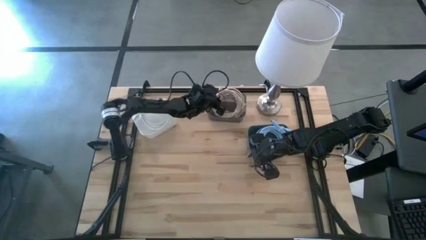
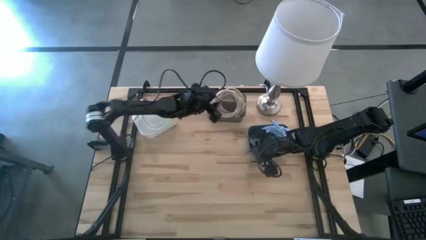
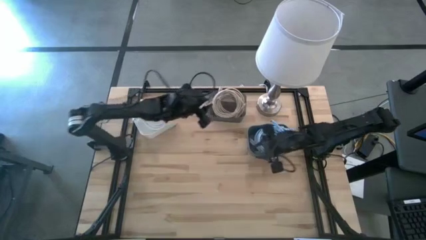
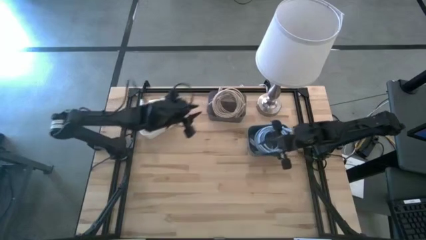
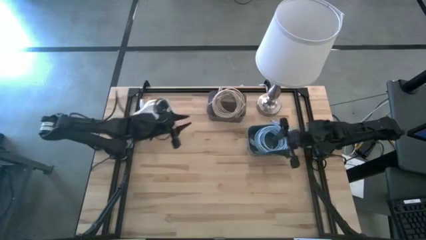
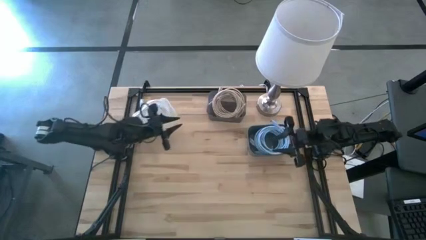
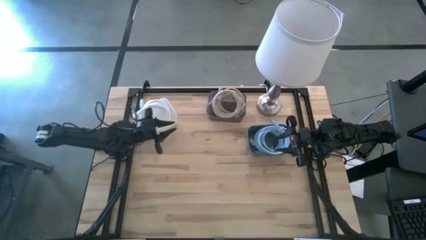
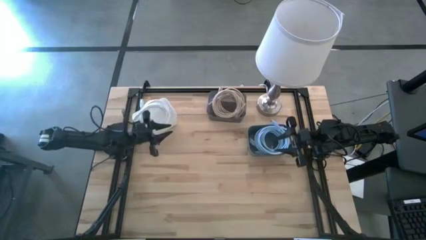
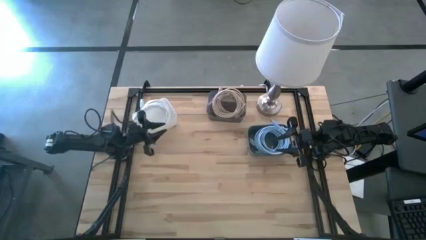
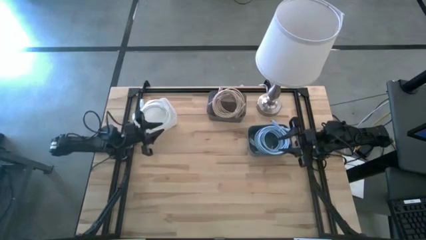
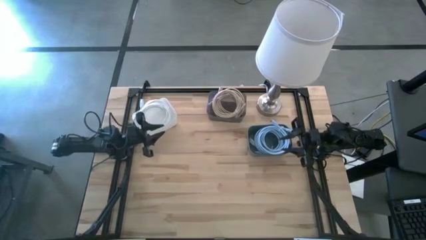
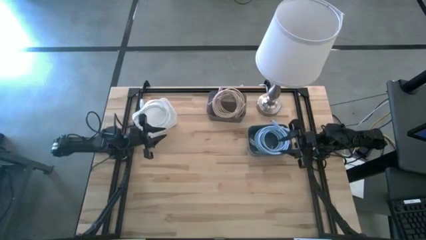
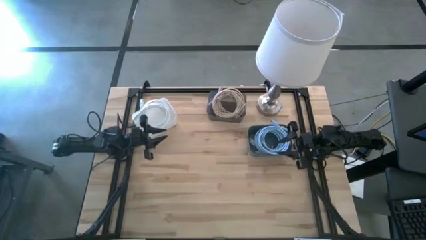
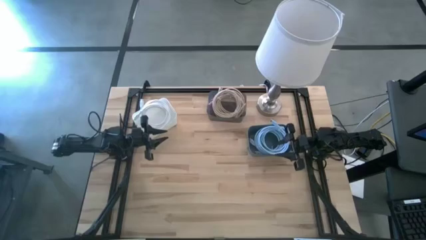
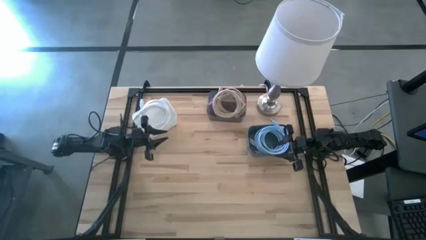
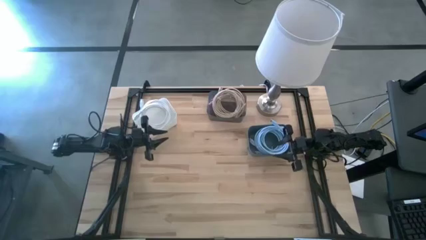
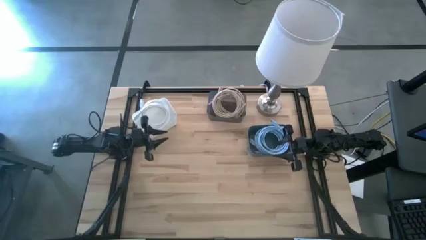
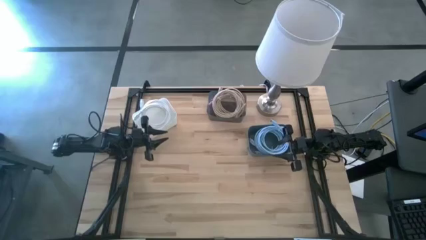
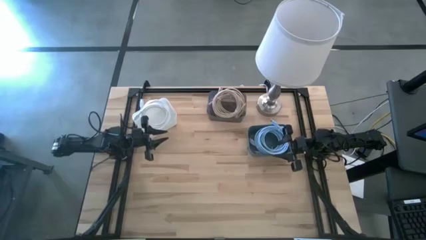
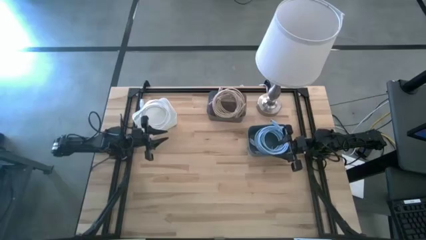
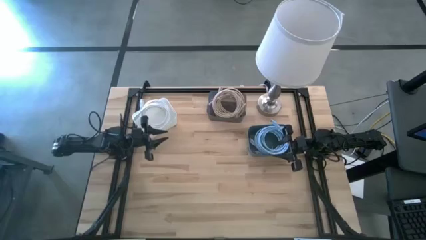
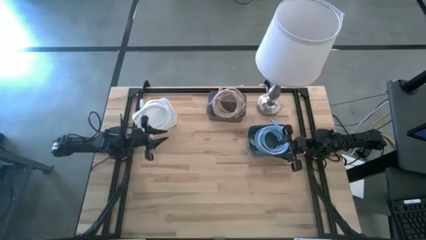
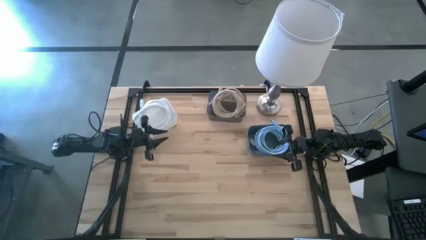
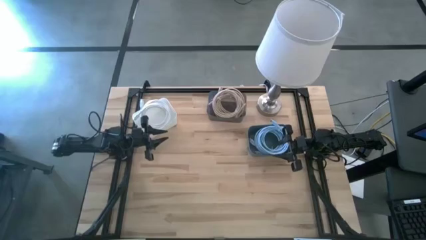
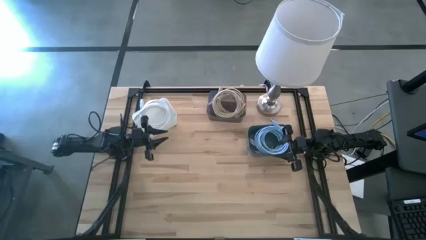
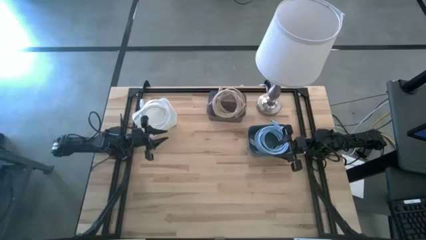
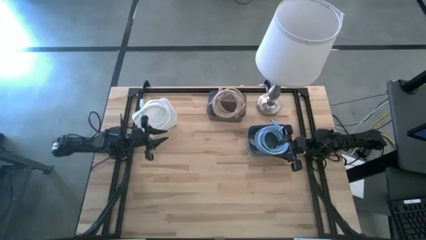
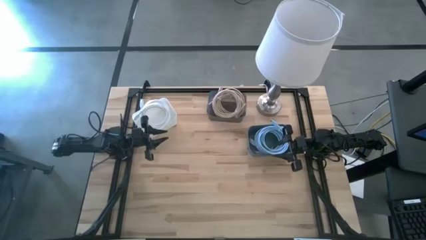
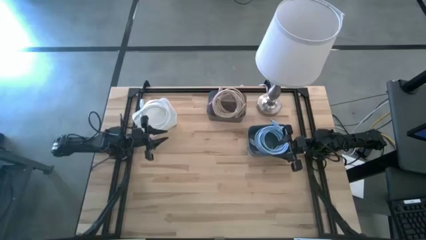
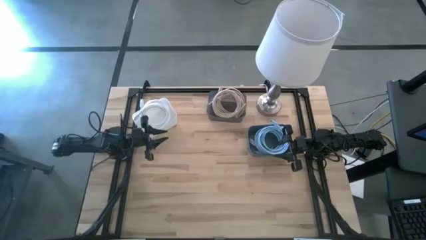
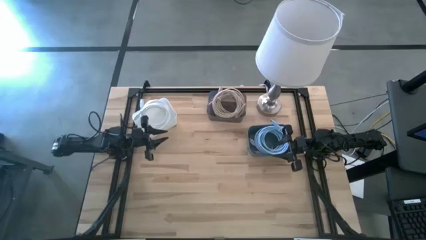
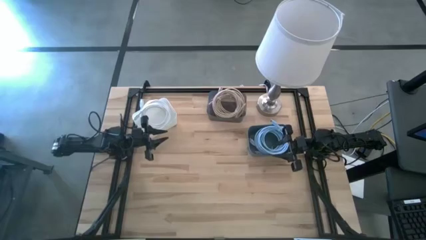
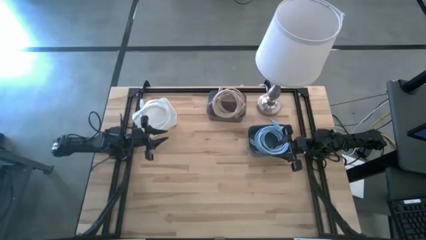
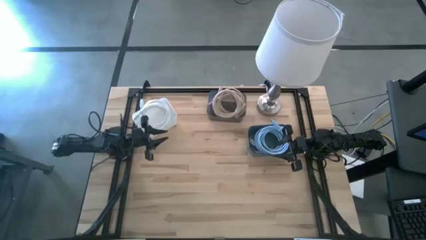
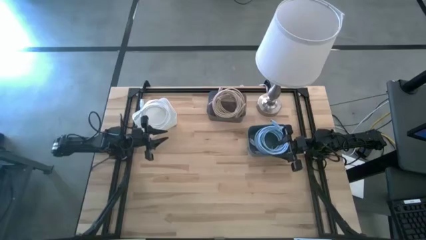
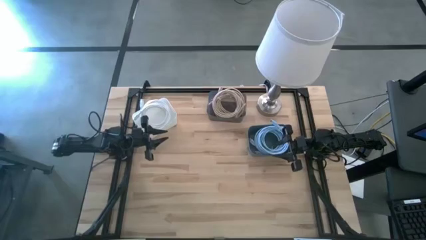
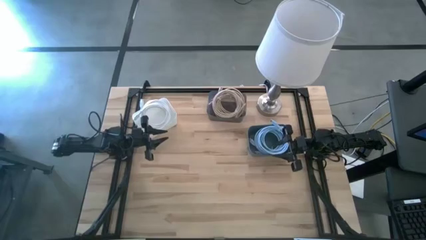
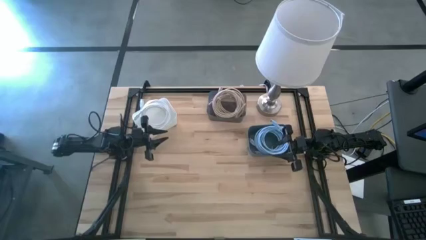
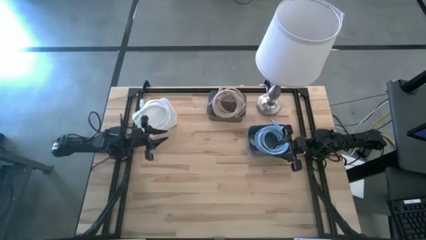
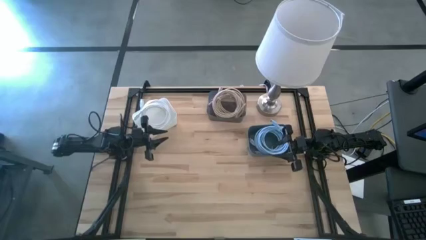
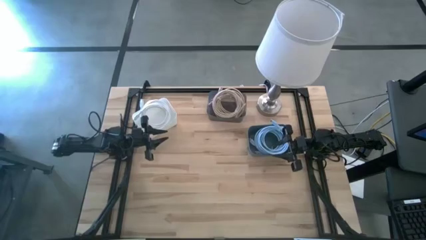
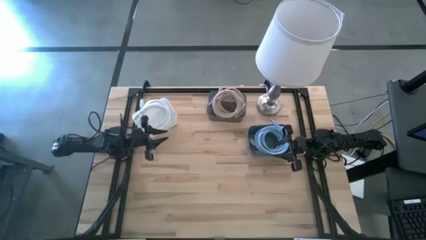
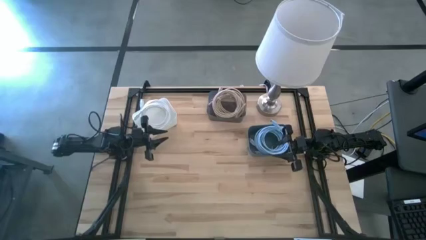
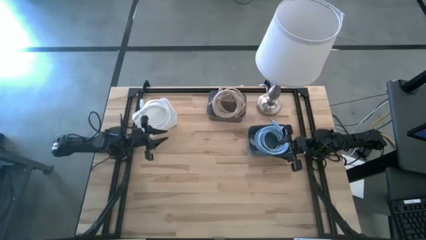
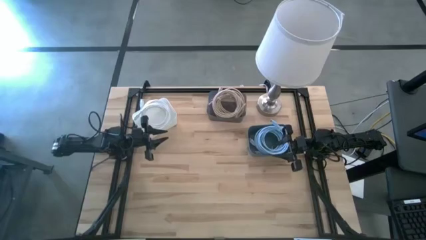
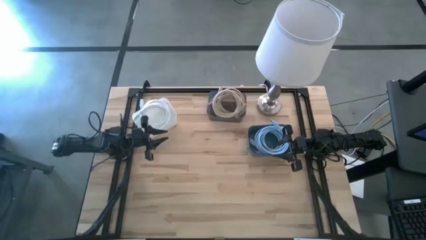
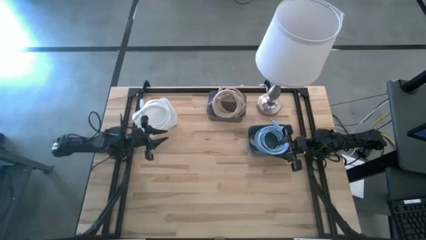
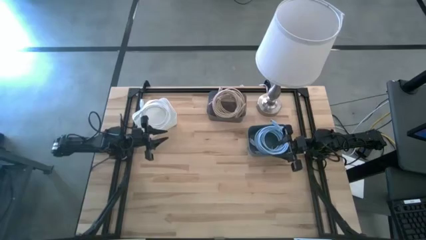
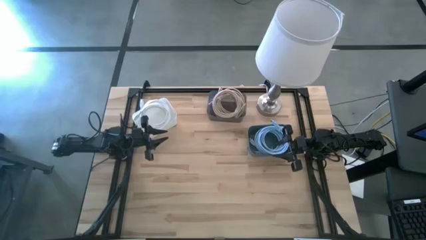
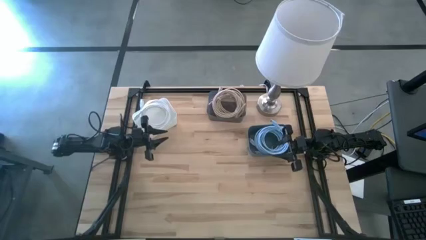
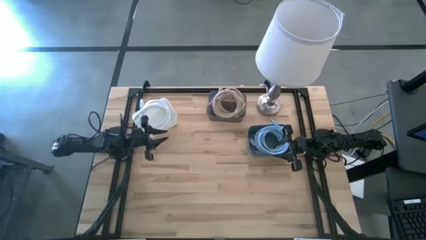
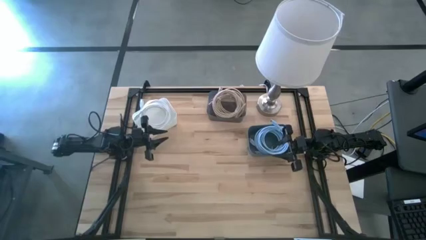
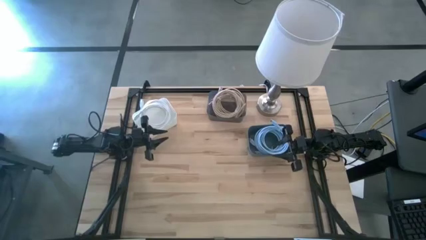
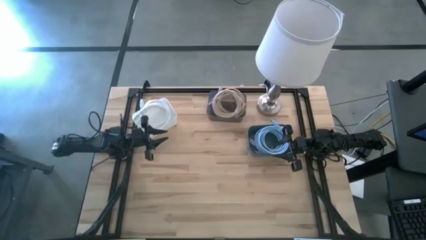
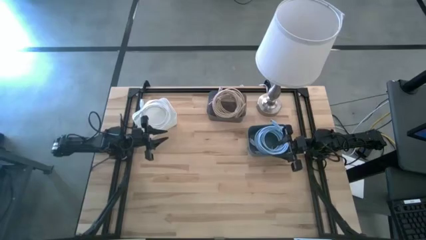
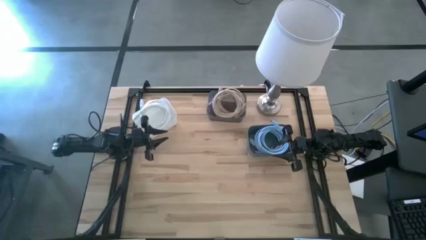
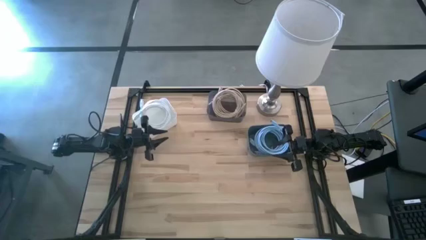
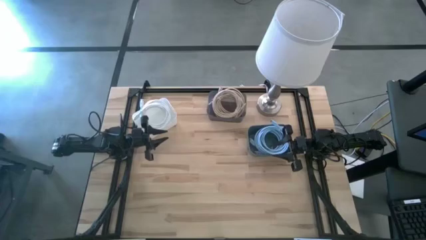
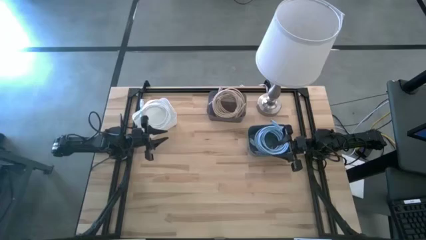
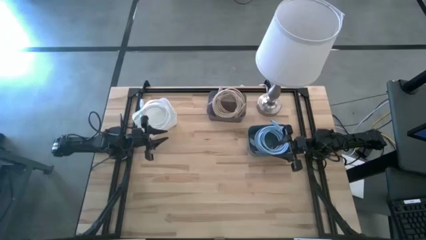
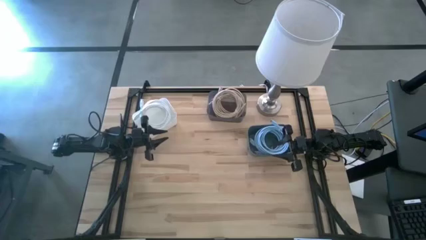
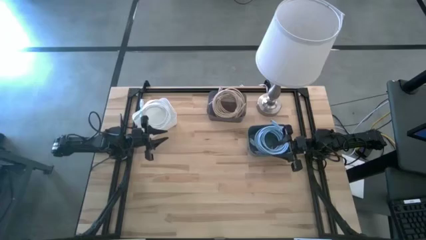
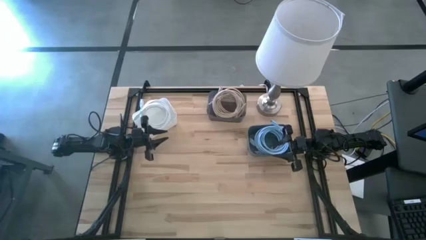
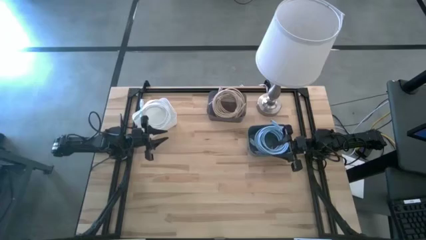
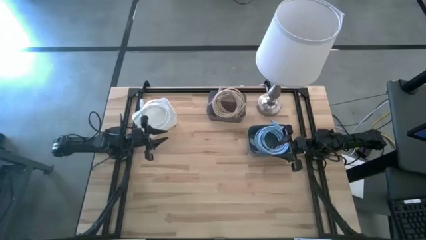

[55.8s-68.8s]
Task: Pick & Place USB Port
Return to Home Position

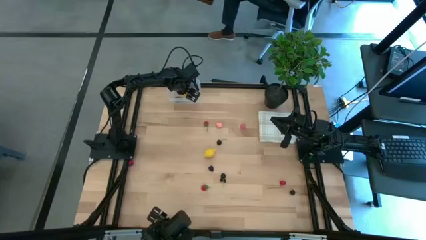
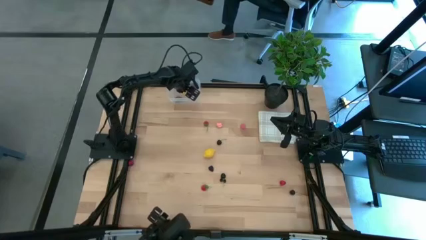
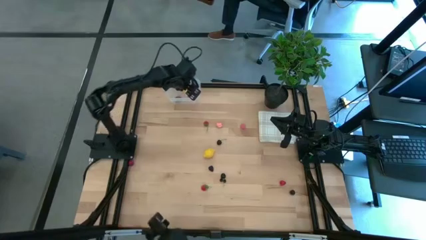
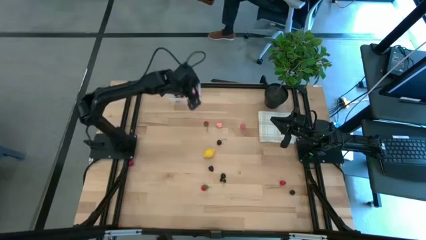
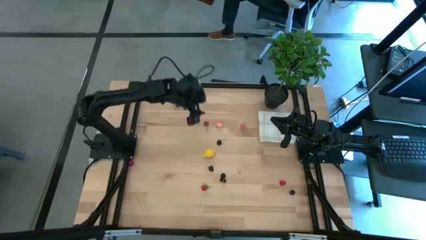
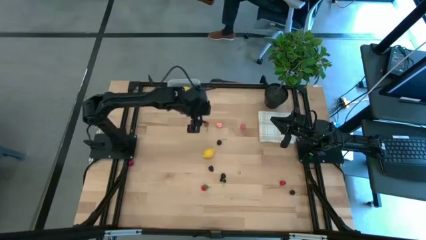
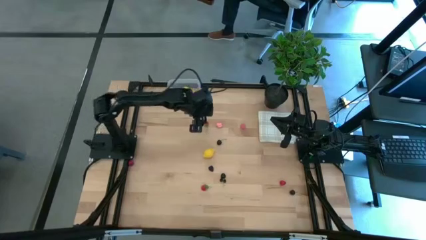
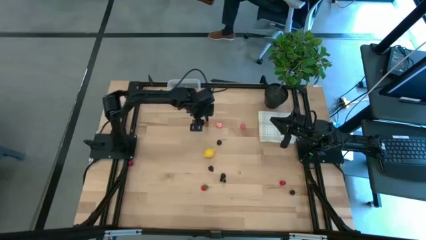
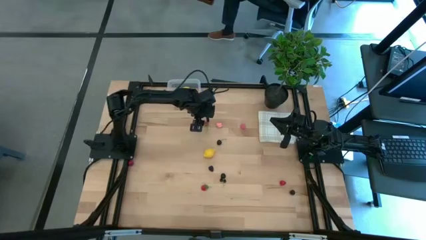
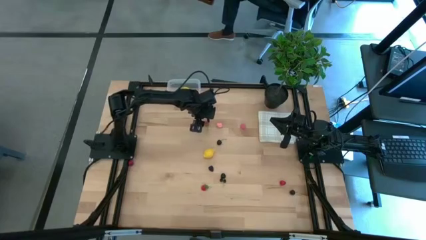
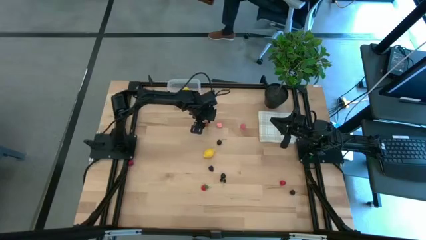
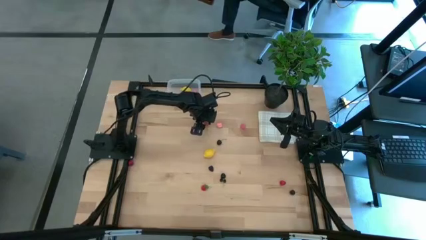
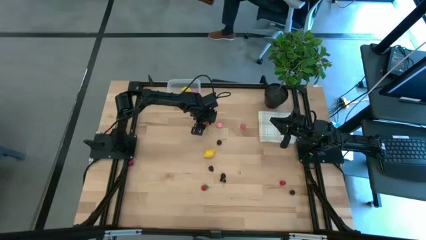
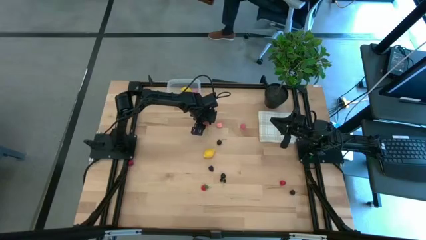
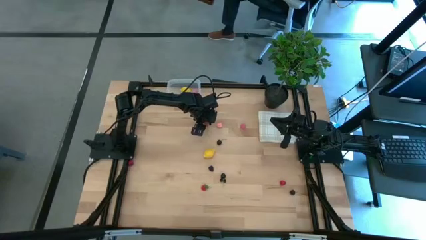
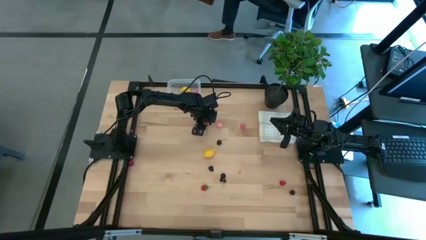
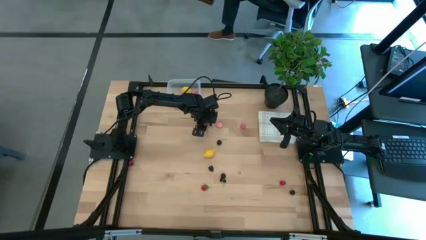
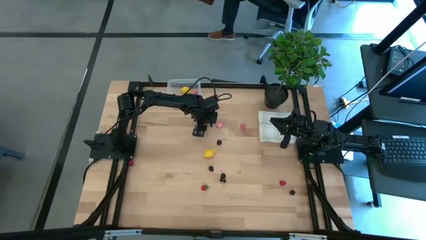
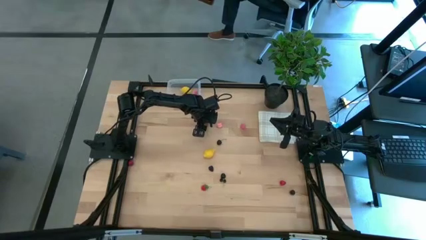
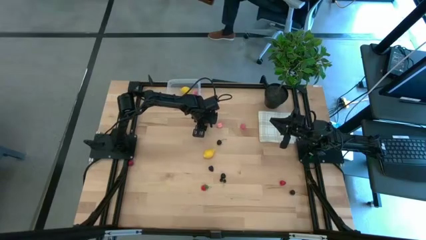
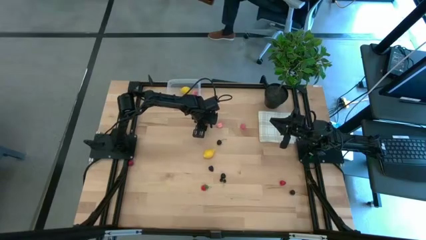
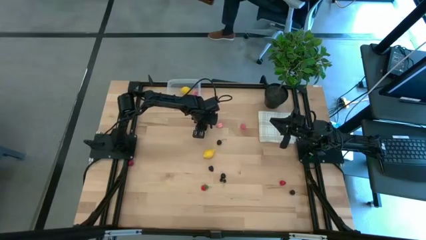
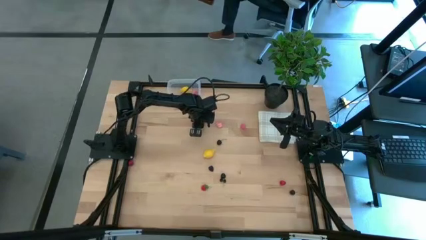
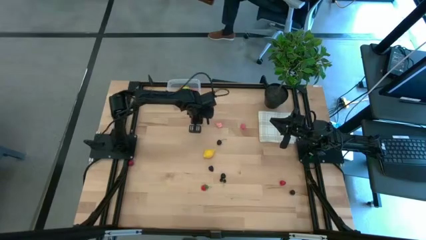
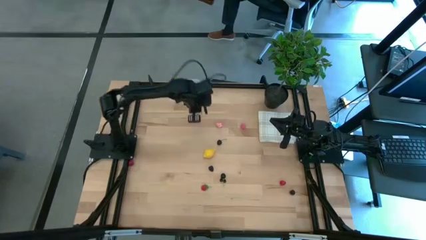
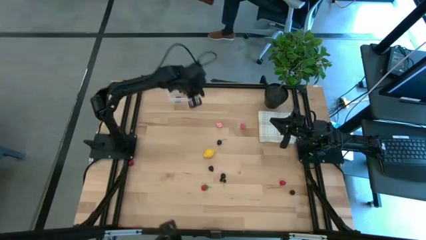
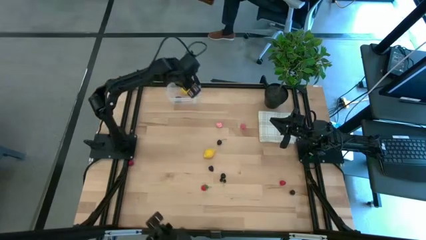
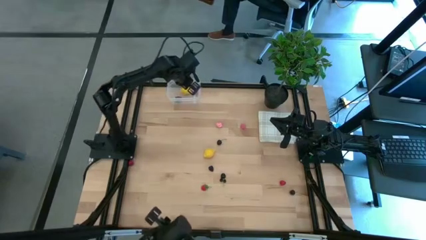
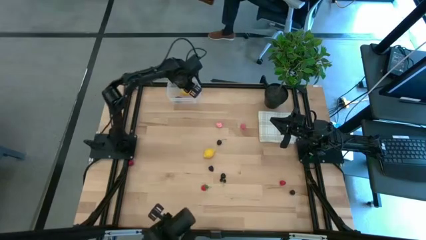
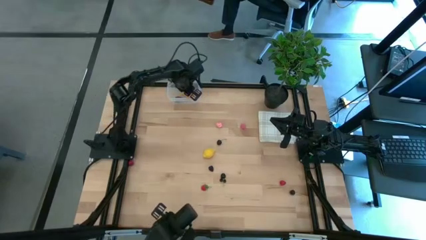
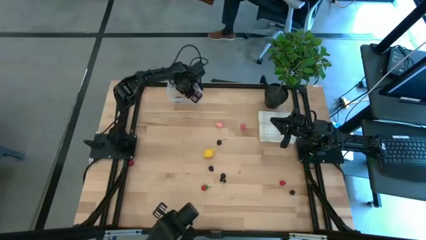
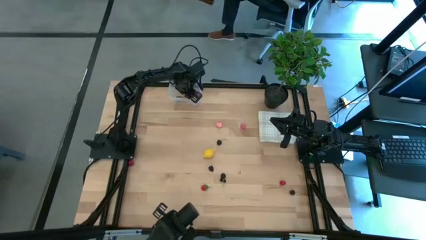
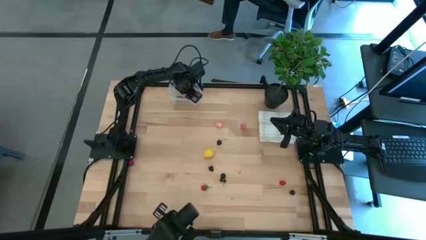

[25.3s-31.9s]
Task: Pick and placing Produce into tupperware
Put the top red strawberry into the transparent bin
